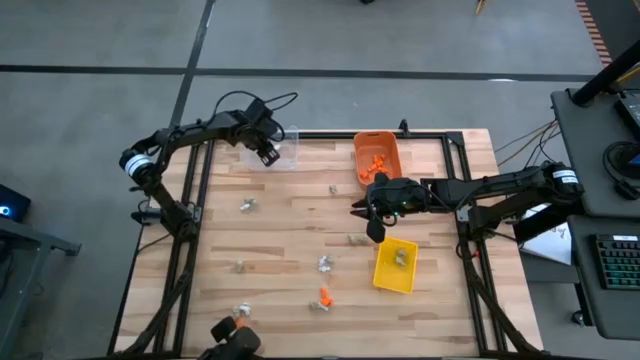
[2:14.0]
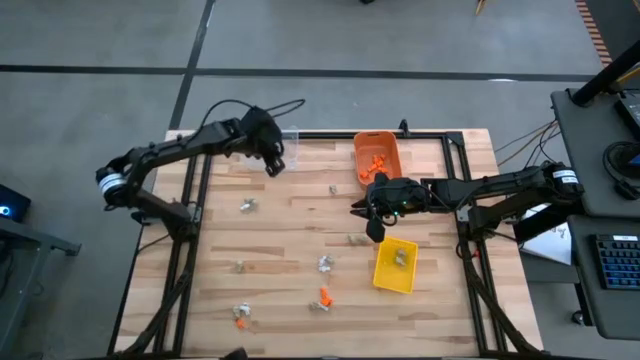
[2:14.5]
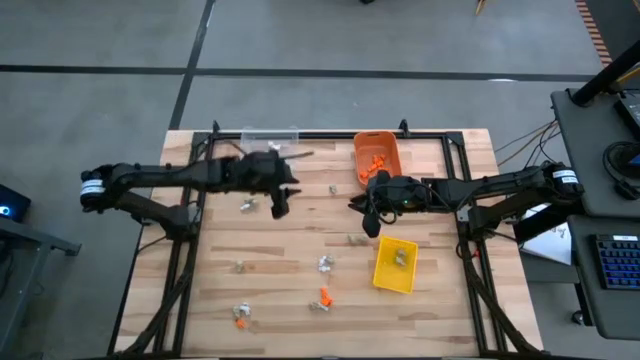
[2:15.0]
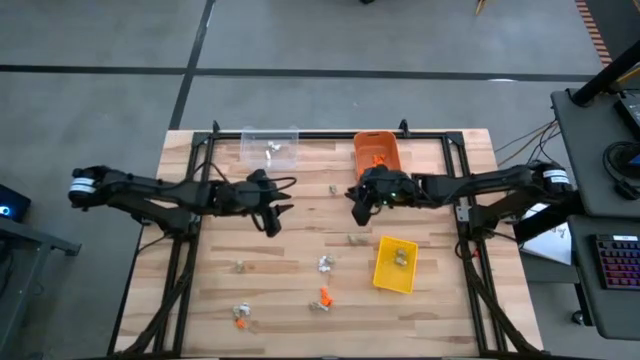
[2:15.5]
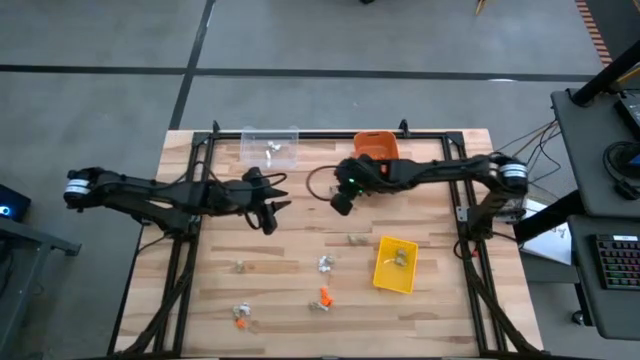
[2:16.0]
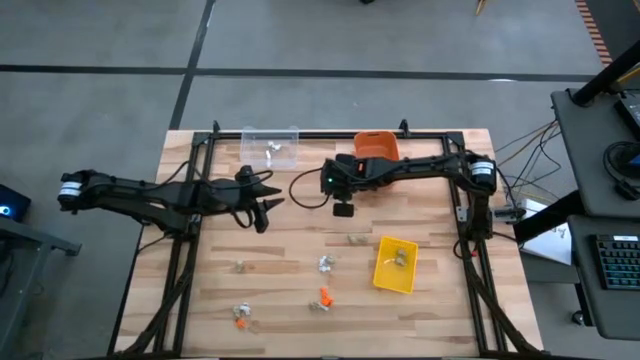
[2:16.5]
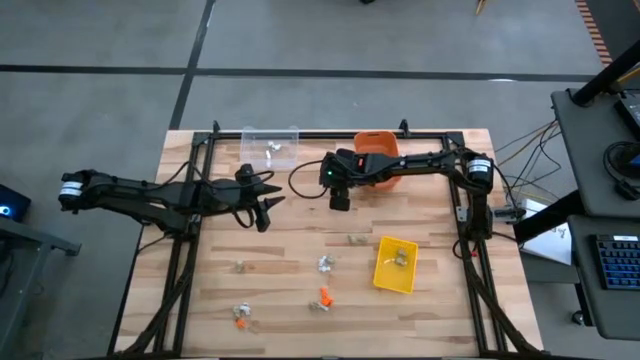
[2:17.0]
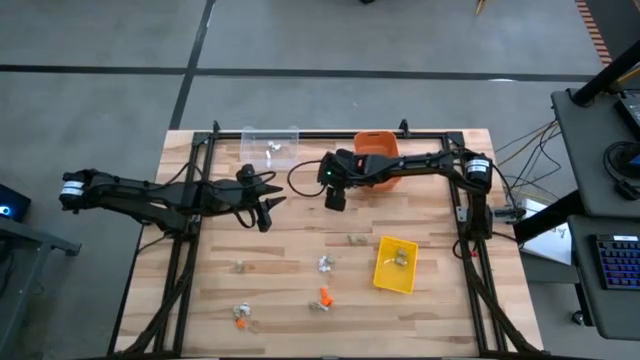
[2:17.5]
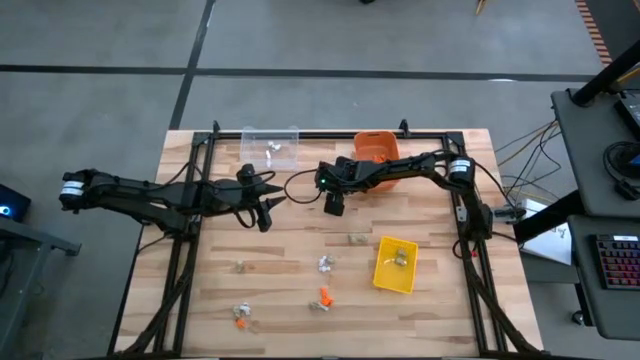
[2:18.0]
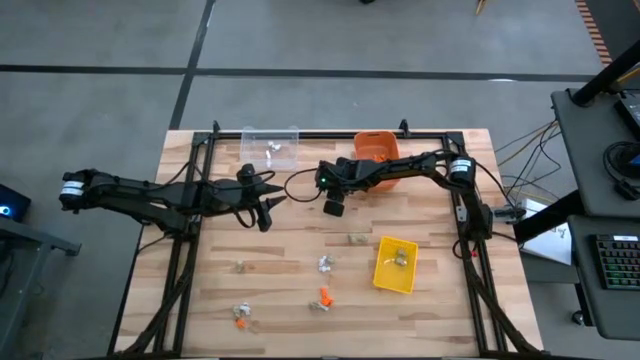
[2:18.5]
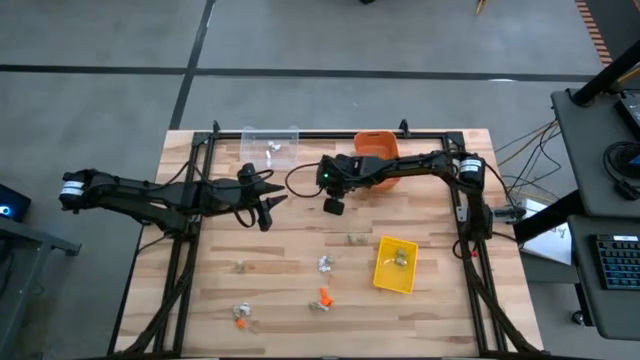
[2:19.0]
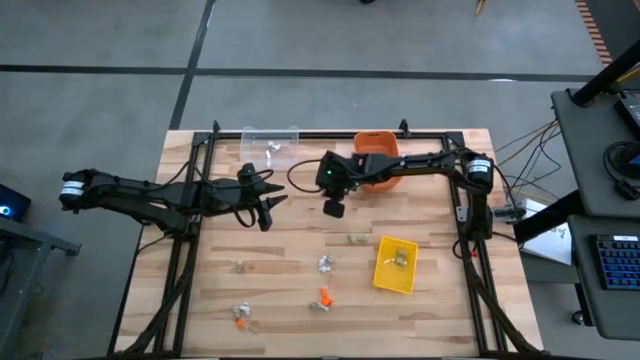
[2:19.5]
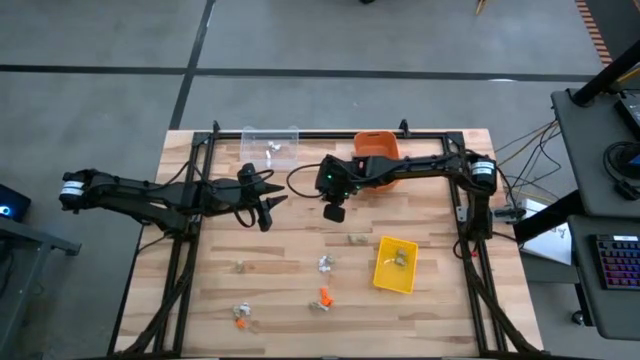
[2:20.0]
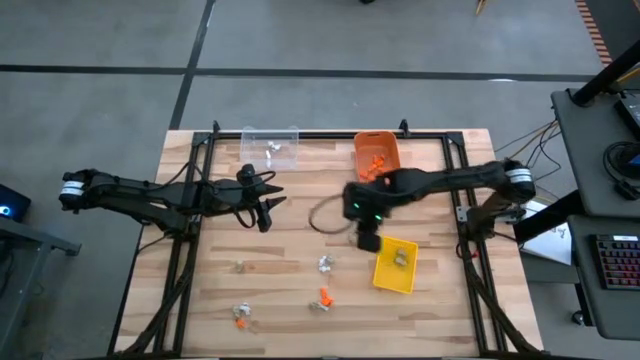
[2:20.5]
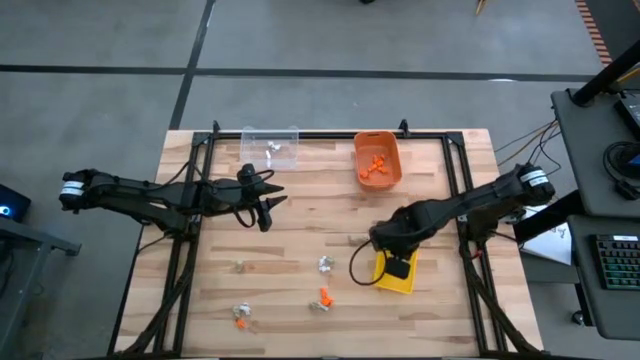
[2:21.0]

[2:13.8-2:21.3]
Task: Sort Halloween decoration
Put the gray skull toy into the yellow bin

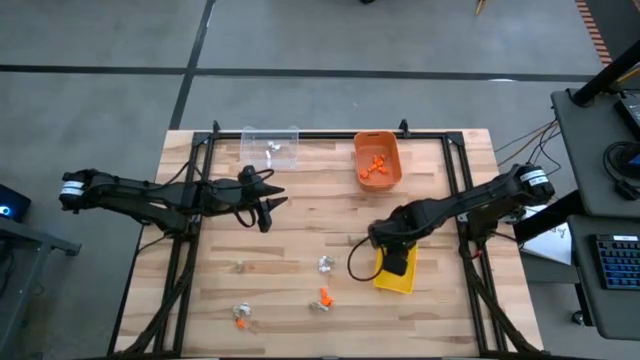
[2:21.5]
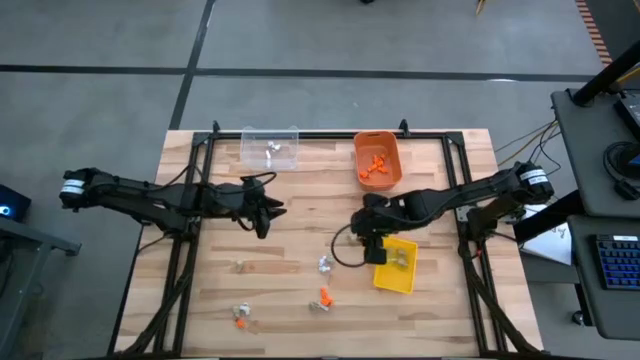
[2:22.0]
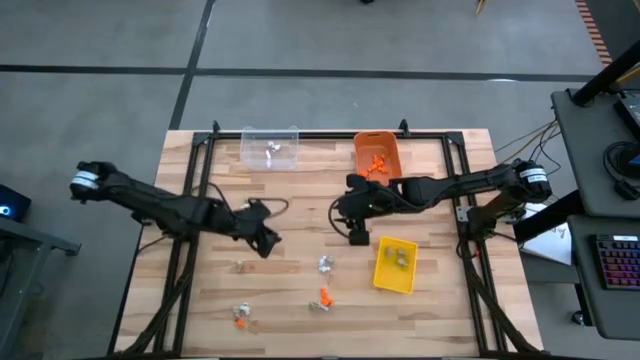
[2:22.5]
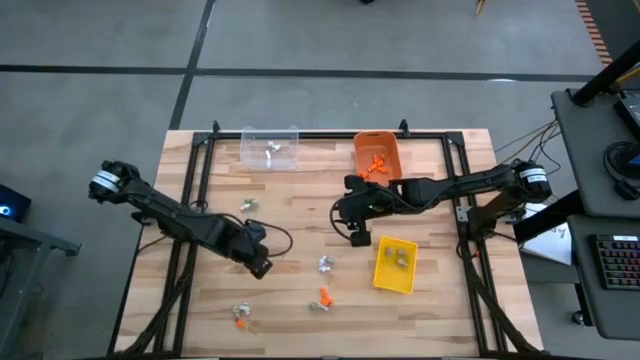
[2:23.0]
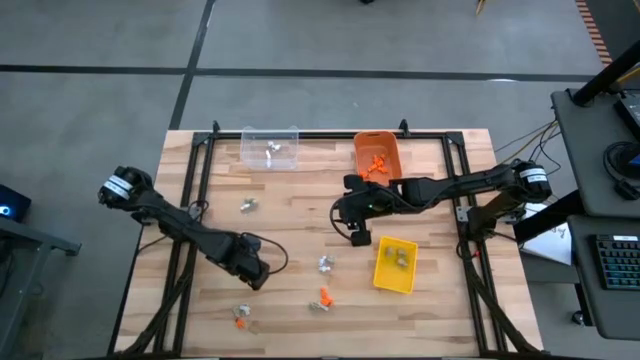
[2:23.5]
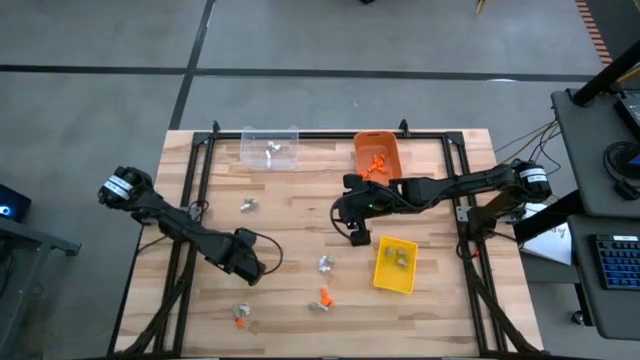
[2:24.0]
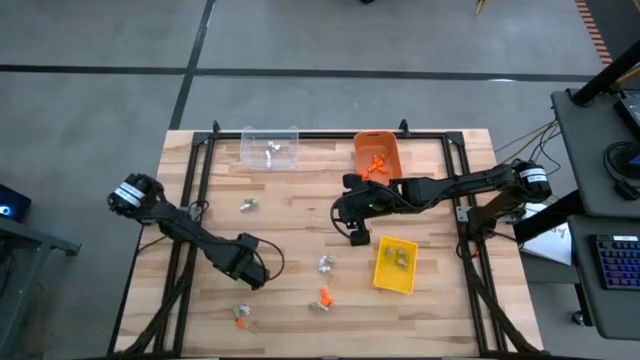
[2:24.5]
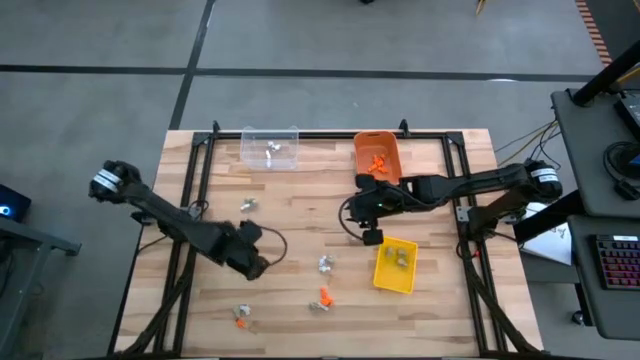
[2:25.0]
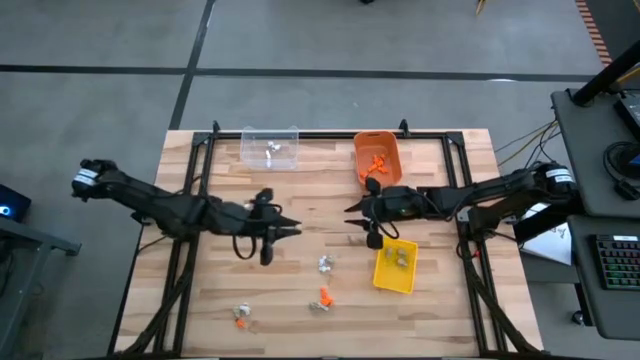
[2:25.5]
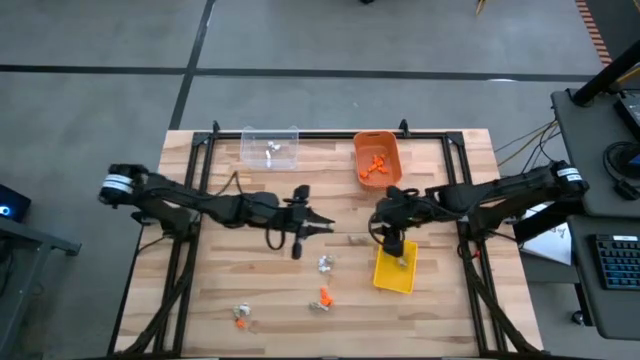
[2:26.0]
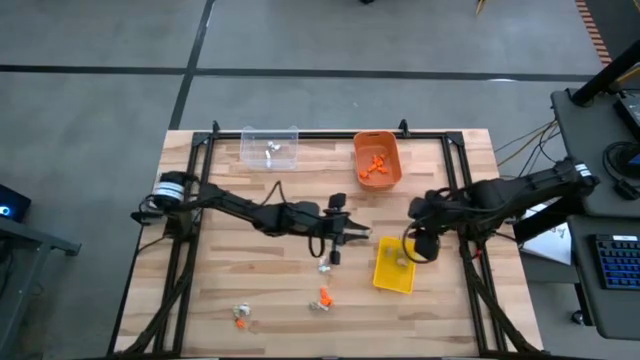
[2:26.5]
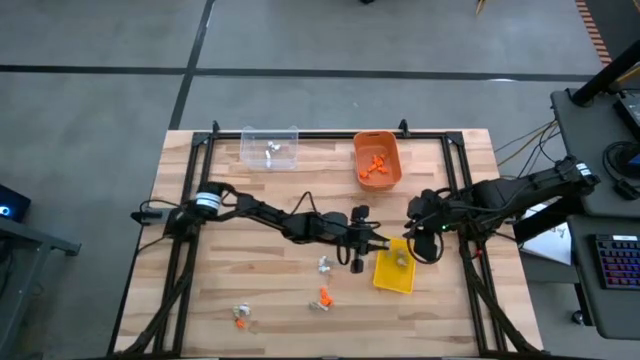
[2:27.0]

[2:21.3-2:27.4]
Put the gray skull toy into the yellow bin

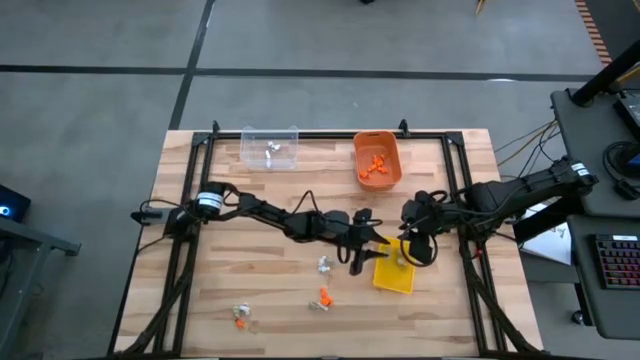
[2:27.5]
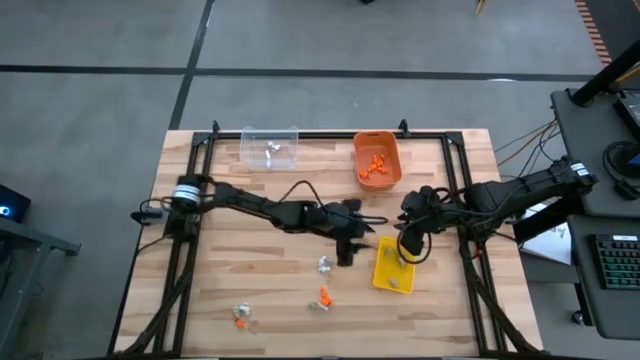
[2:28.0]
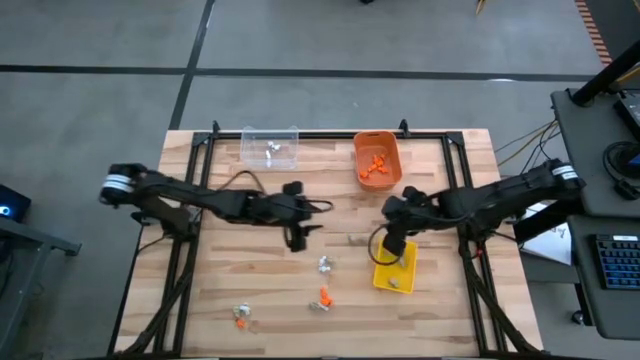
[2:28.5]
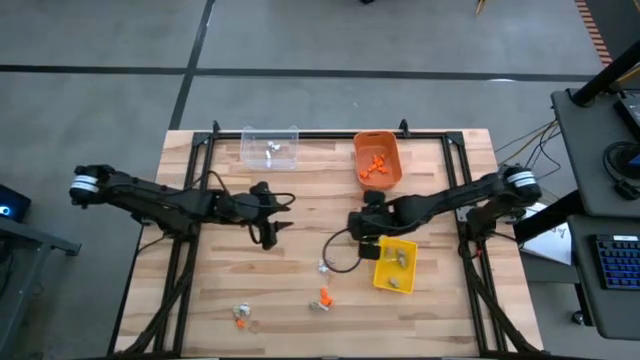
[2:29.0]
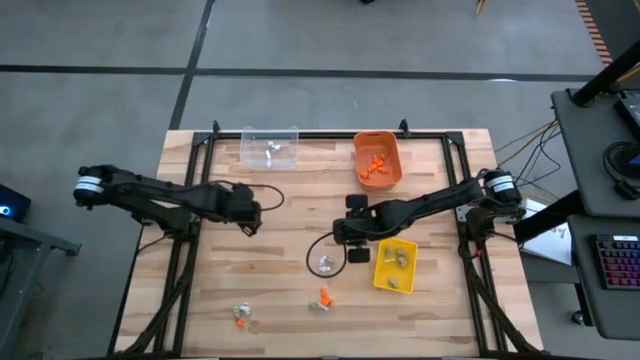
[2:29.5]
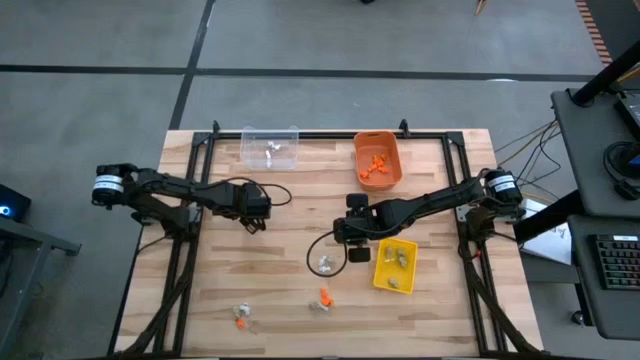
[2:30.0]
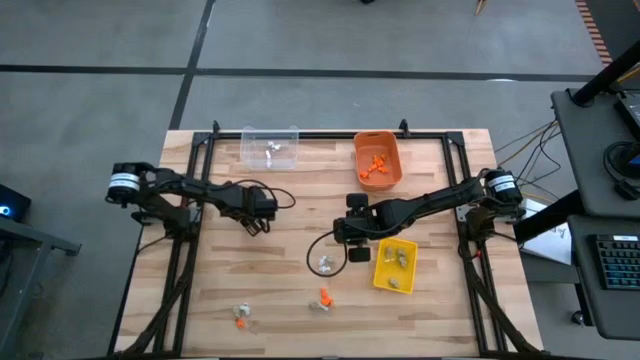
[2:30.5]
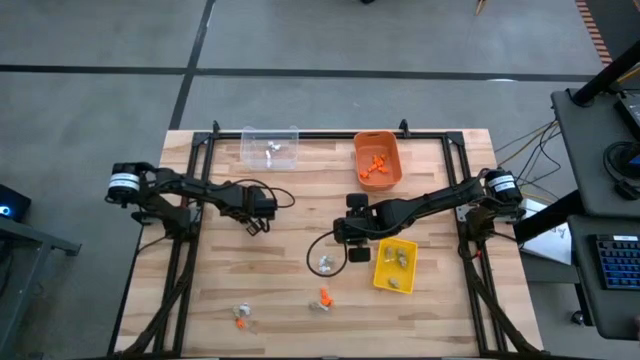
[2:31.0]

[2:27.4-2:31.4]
Put the white skeleton toy into the transparent bin

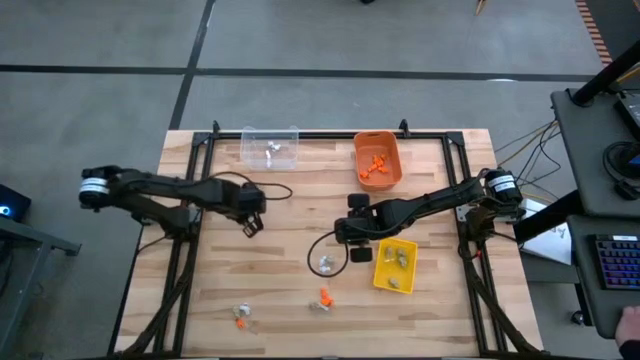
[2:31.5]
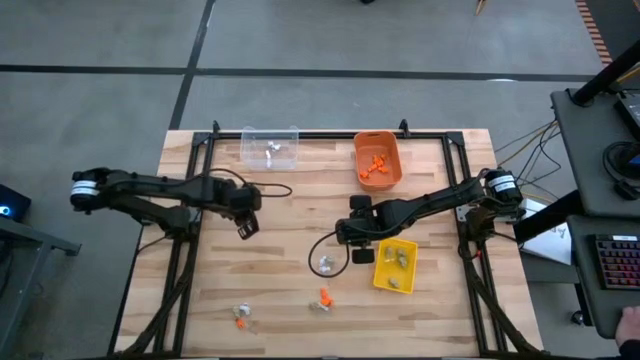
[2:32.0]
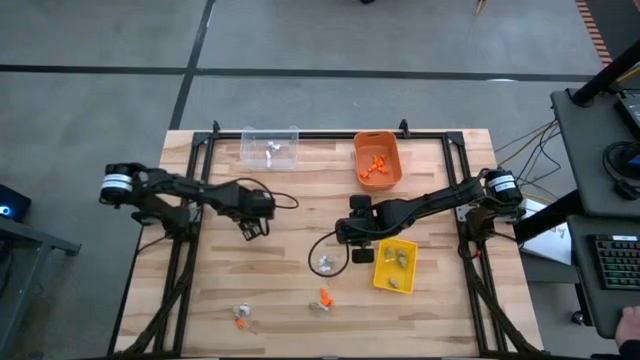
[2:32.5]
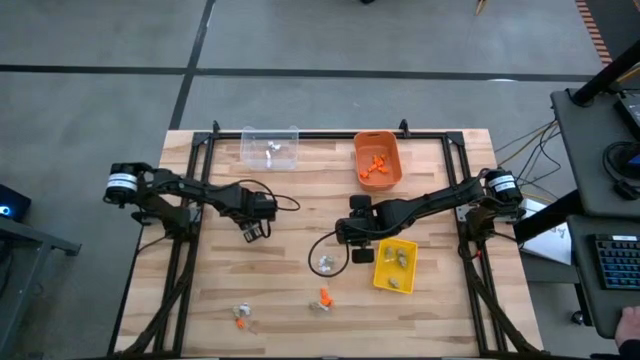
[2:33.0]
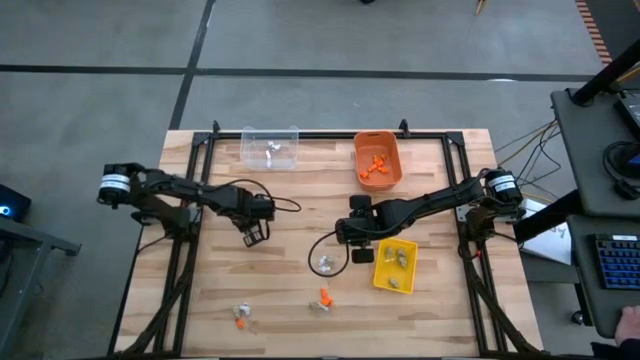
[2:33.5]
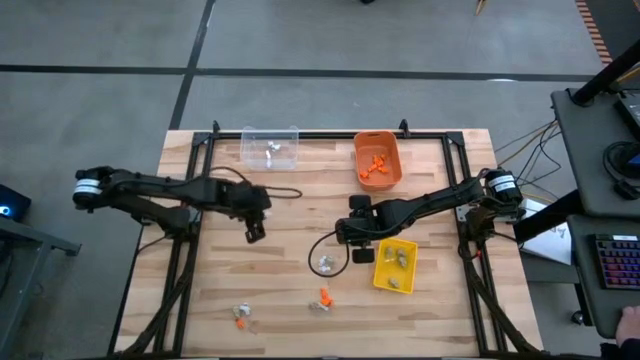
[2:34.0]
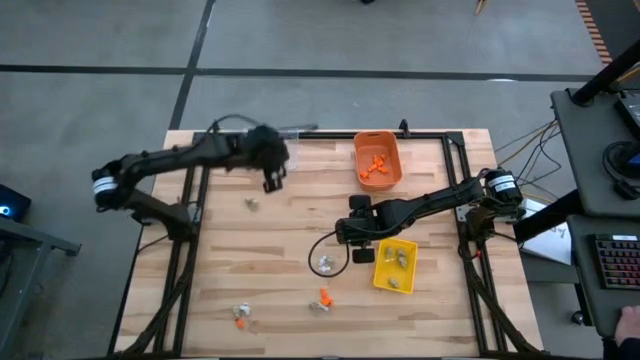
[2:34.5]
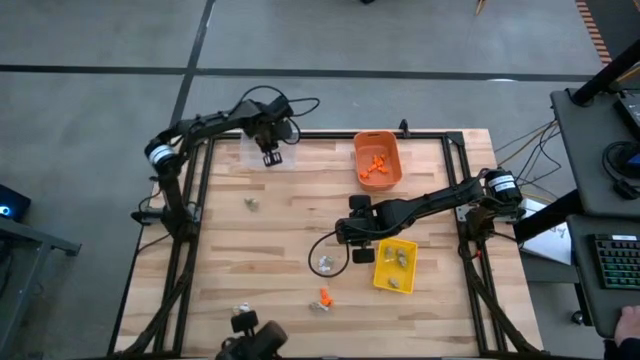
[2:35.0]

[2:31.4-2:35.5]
Put the white skeleton toy into the transparent bin
